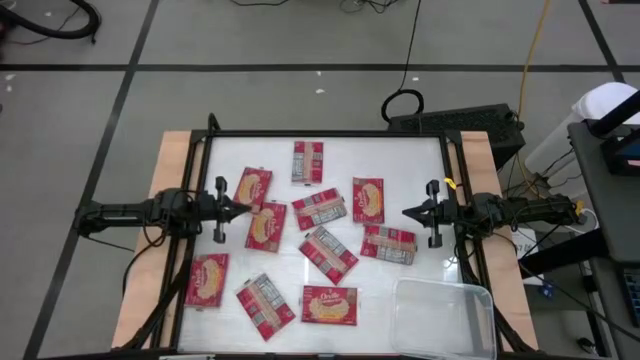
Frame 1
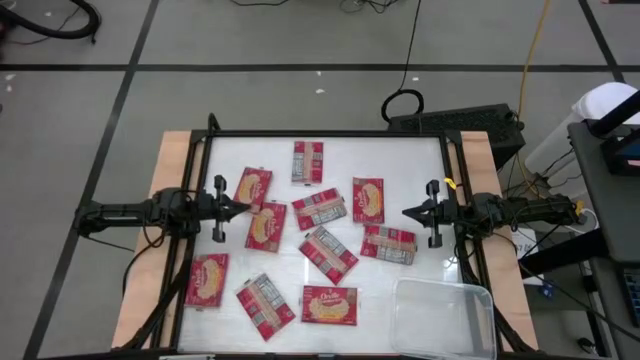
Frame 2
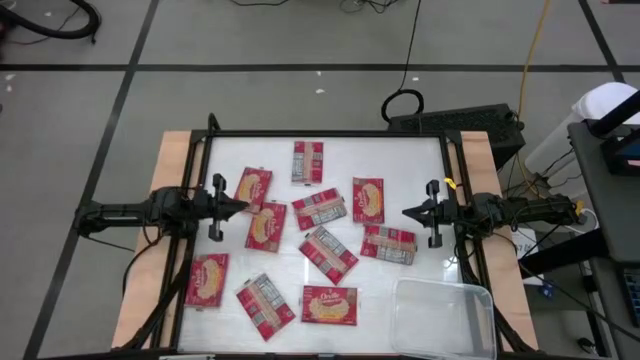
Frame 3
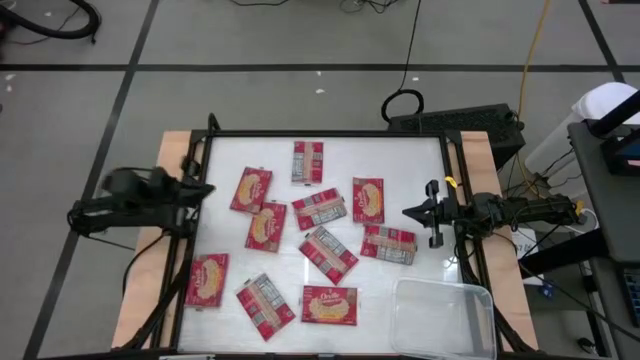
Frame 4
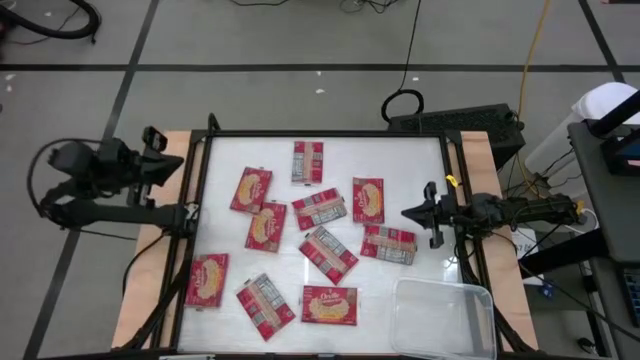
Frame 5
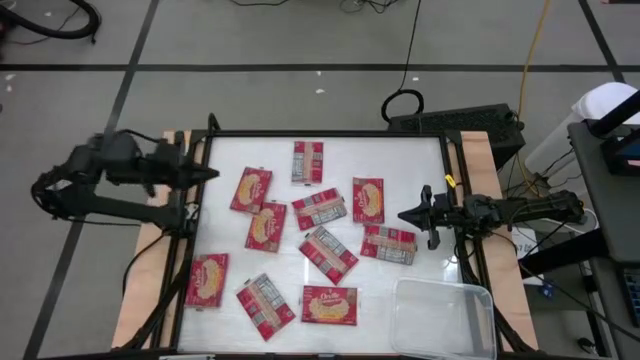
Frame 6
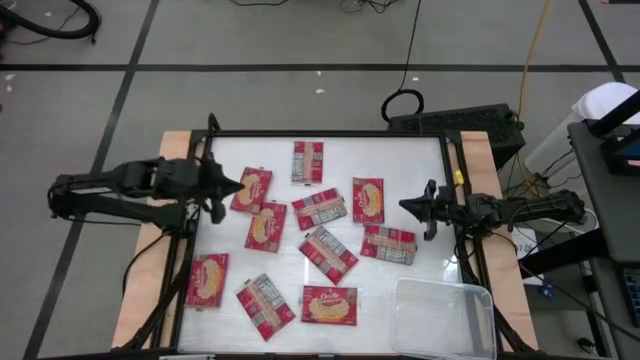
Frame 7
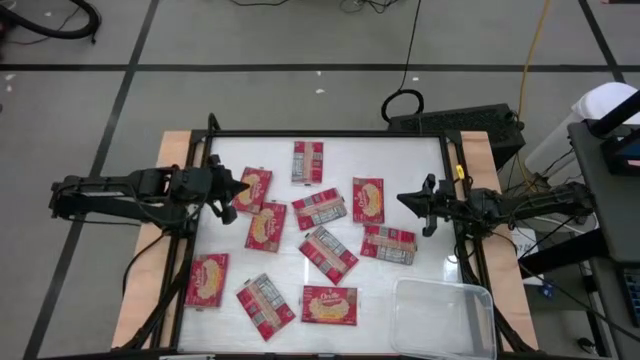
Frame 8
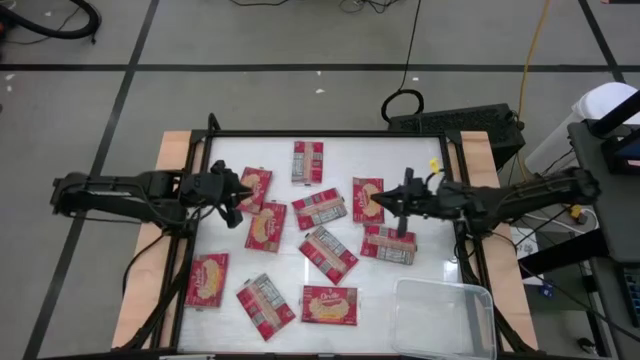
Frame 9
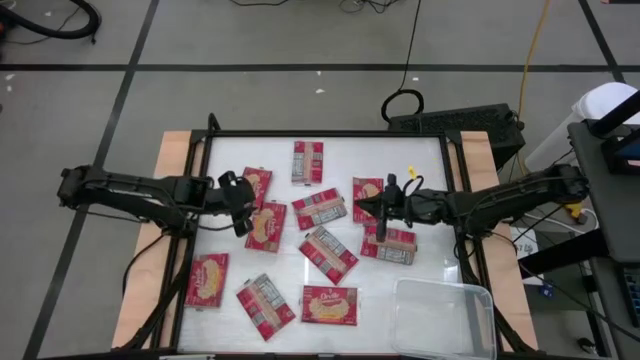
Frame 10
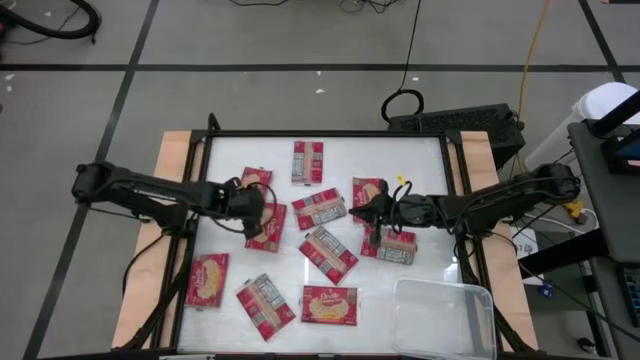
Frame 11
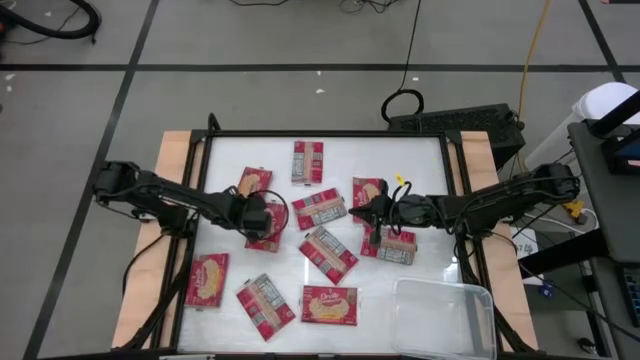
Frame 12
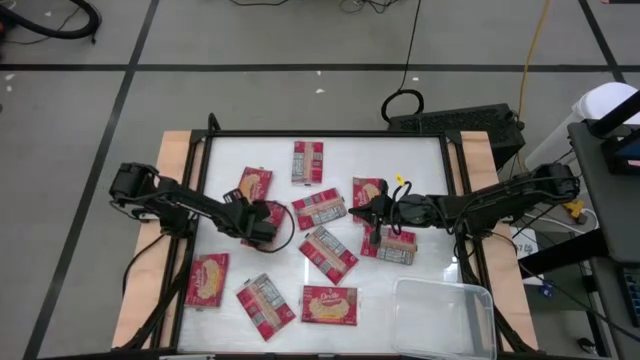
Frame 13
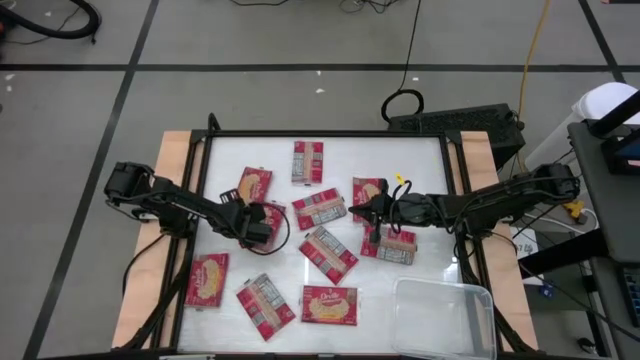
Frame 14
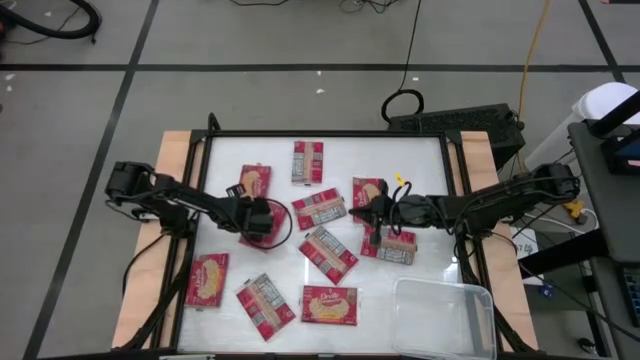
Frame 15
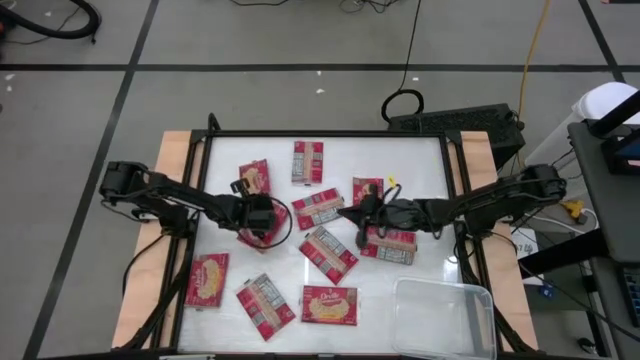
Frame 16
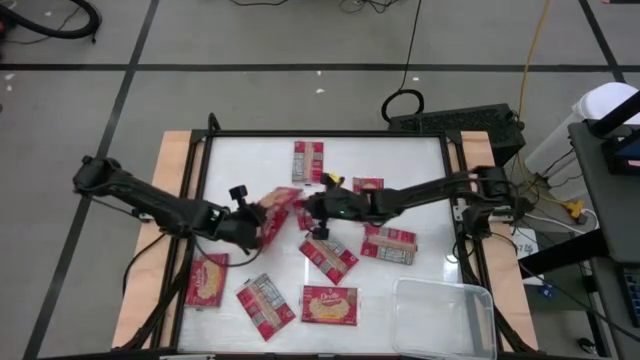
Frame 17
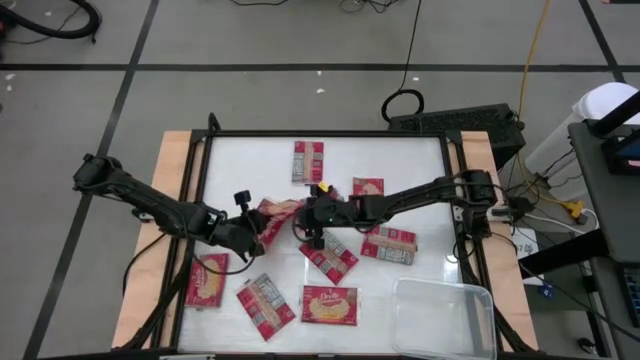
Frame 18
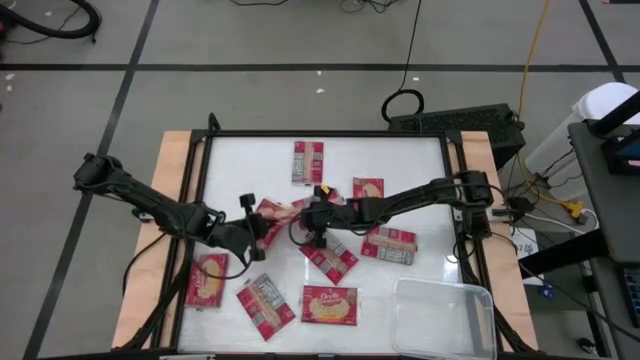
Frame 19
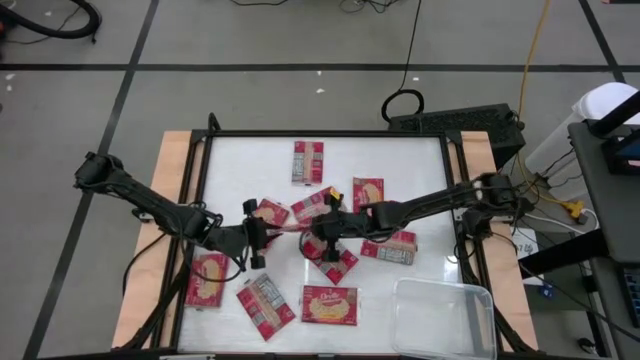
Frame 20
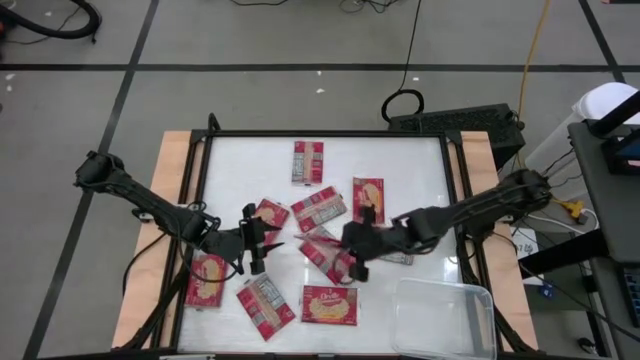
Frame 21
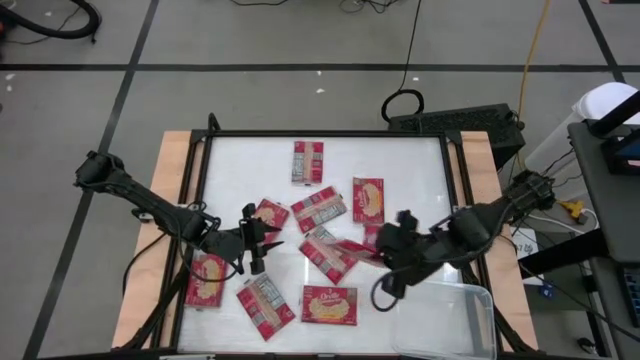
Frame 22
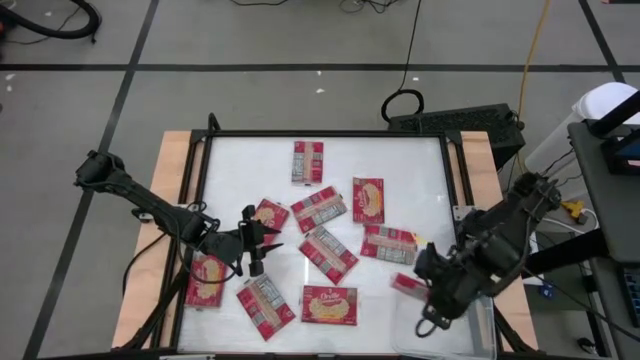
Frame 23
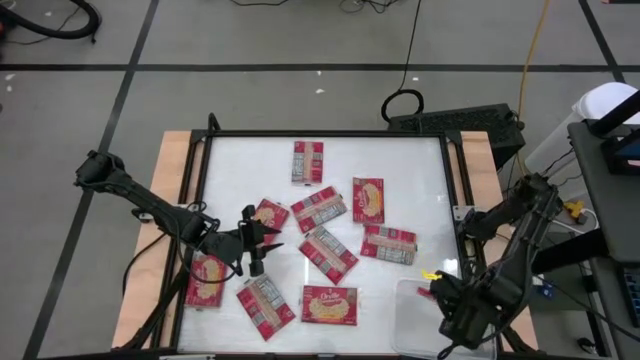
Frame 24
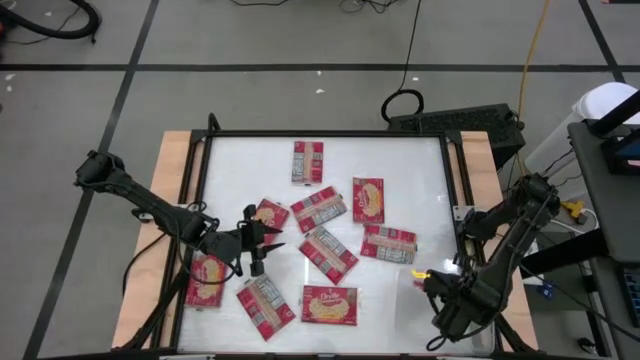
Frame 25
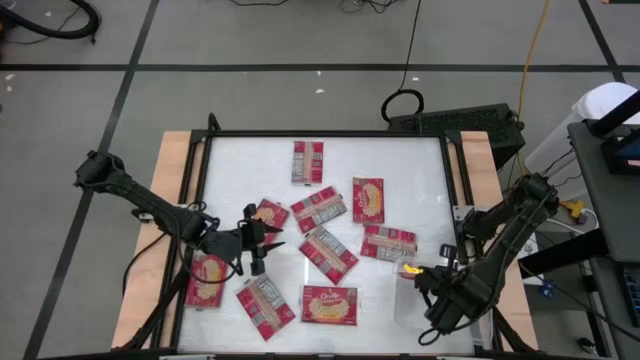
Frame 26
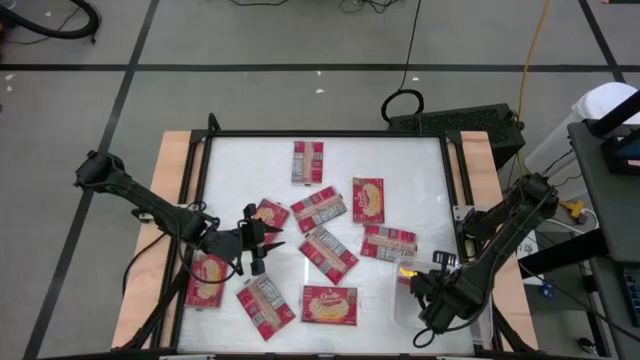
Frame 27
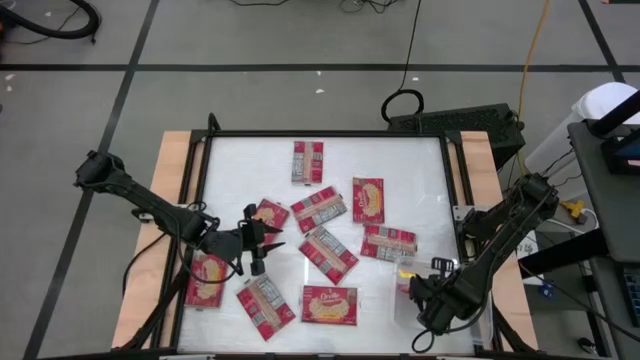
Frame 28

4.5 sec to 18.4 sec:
Task: Sort popcorn bags into baskets
Put the red popcorn pack into the transparent bin

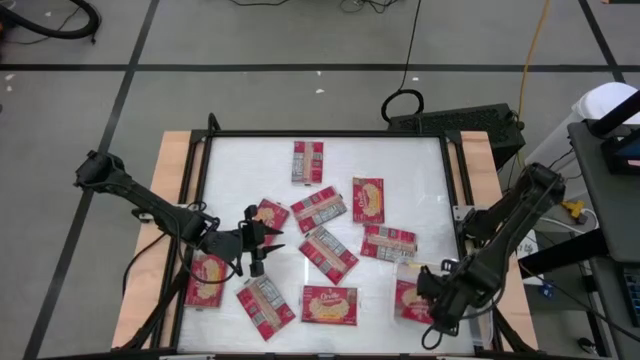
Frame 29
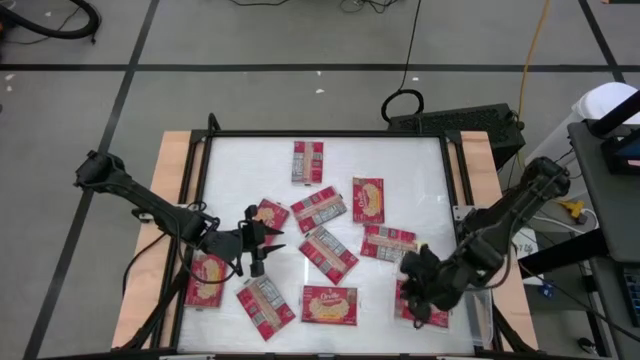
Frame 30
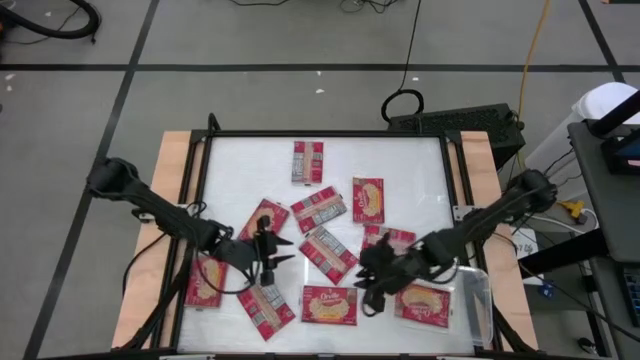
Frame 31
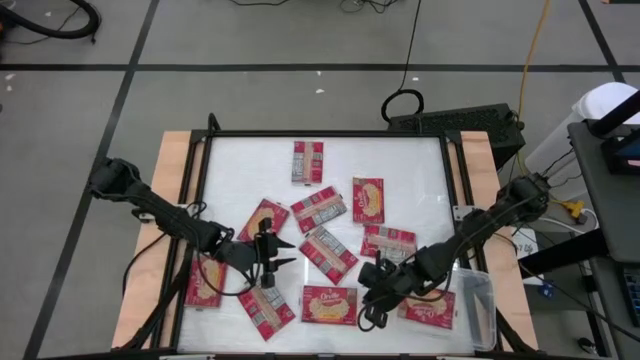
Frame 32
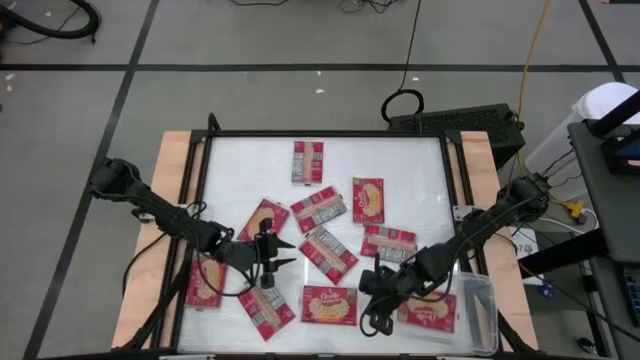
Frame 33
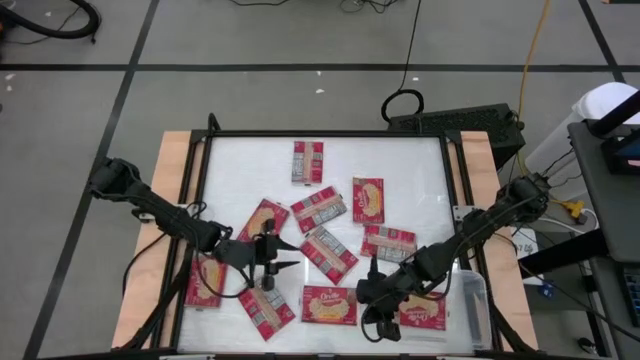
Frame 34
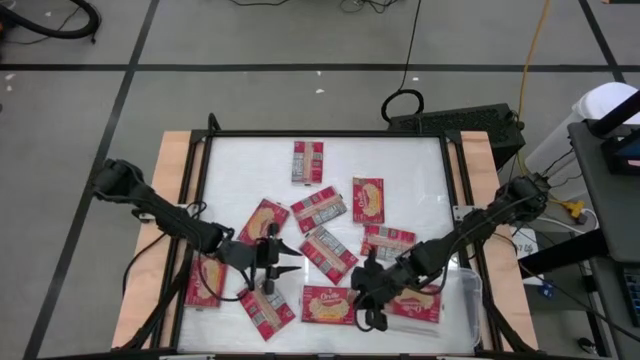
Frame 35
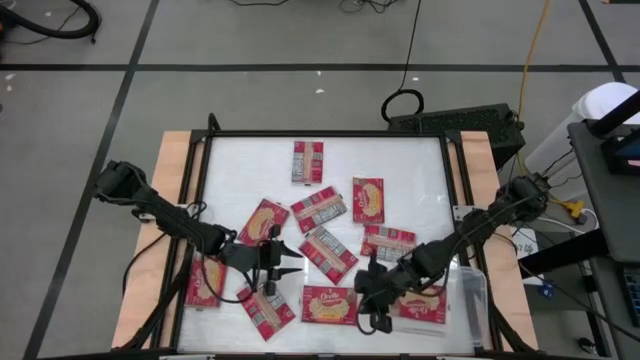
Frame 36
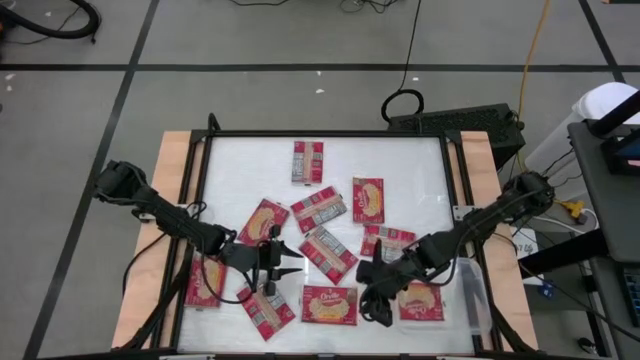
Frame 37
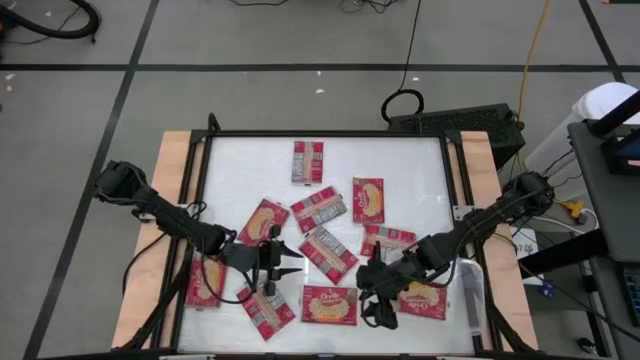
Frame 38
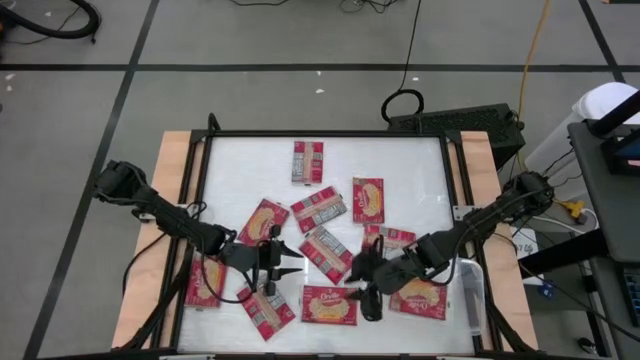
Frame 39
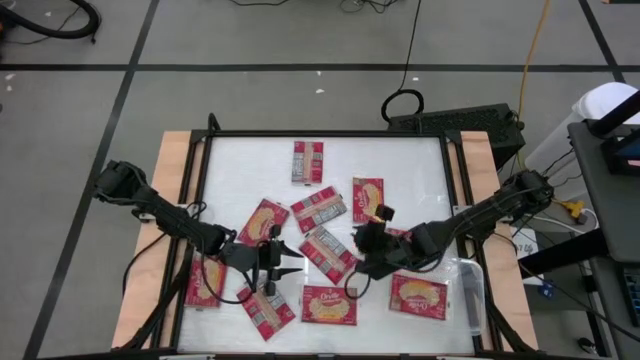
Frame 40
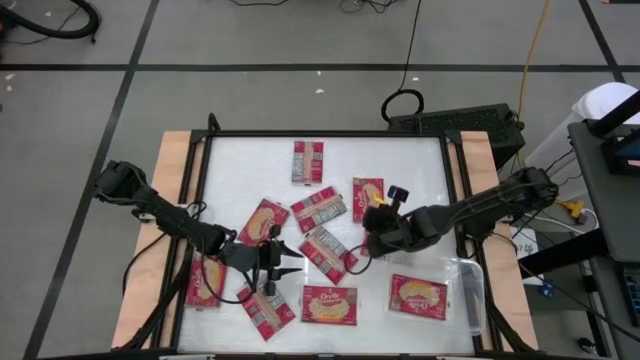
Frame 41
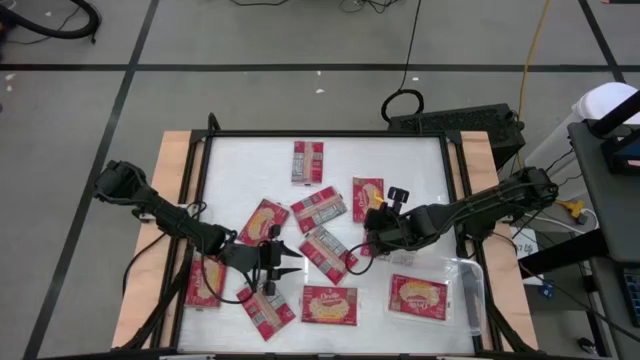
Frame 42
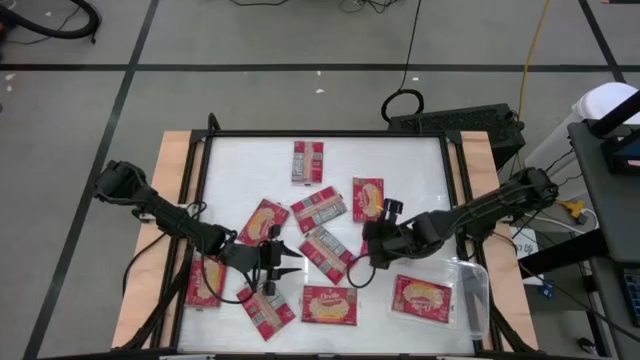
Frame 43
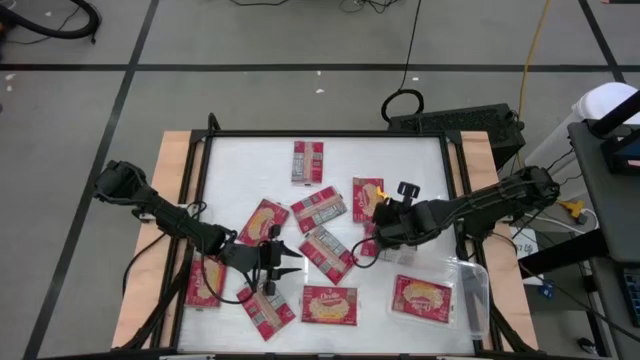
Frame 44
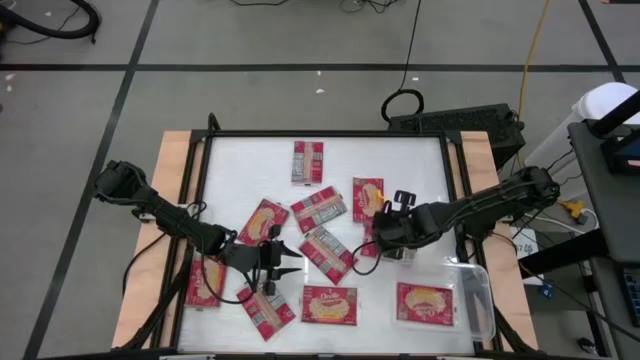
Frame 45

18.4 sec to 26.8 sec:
Adjust the transparent bin
